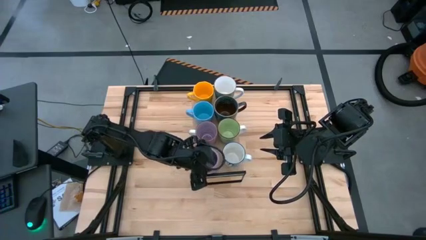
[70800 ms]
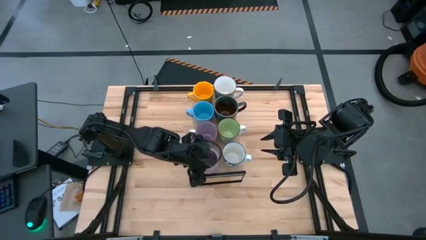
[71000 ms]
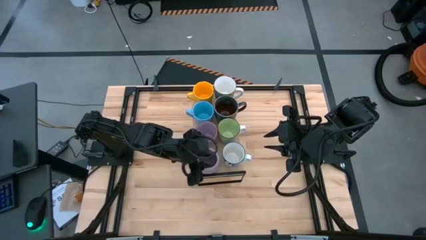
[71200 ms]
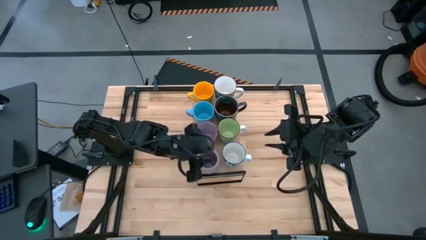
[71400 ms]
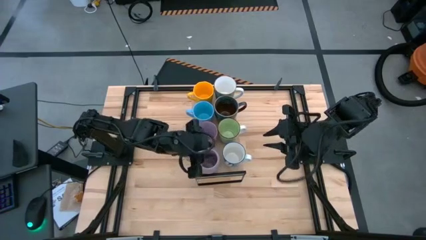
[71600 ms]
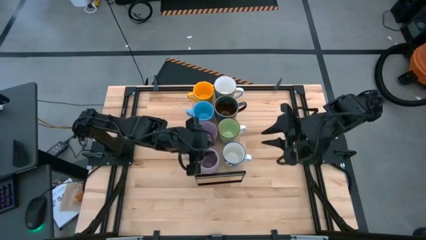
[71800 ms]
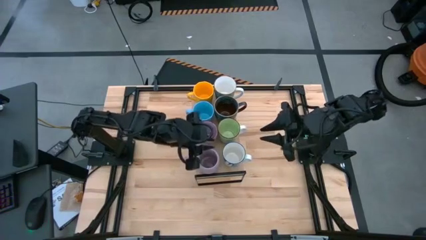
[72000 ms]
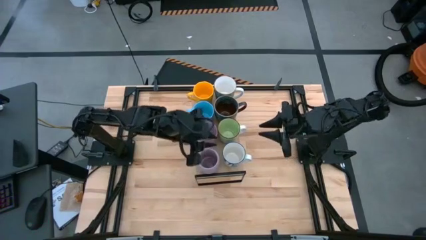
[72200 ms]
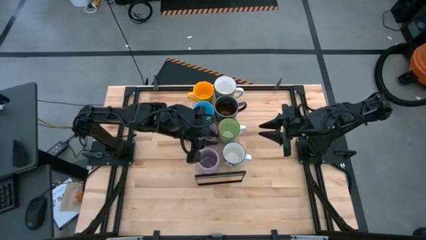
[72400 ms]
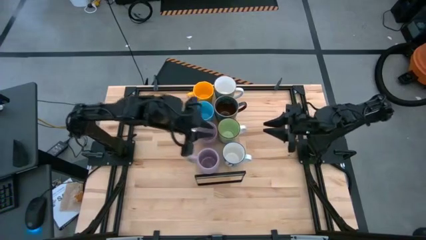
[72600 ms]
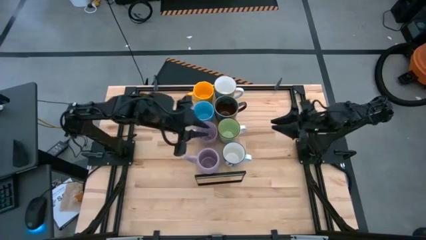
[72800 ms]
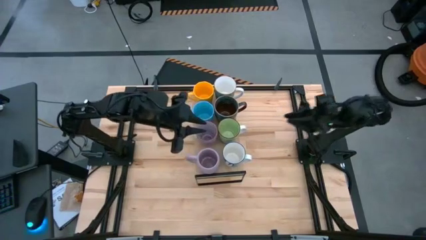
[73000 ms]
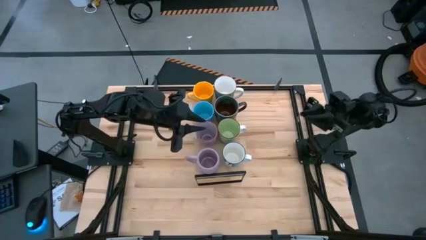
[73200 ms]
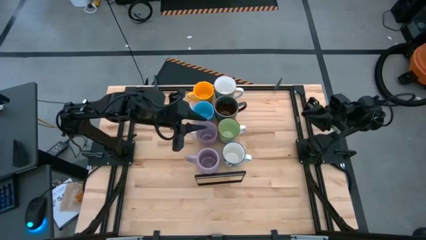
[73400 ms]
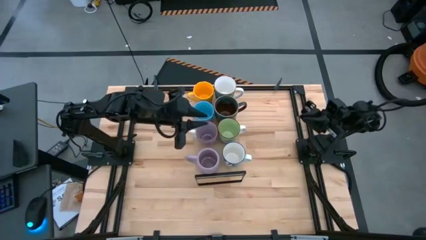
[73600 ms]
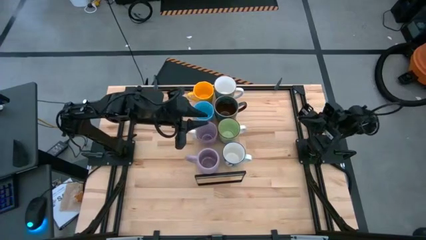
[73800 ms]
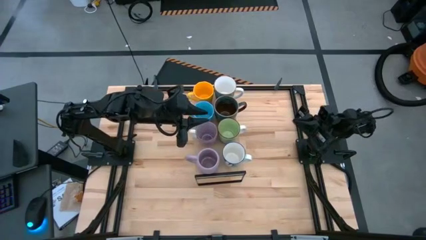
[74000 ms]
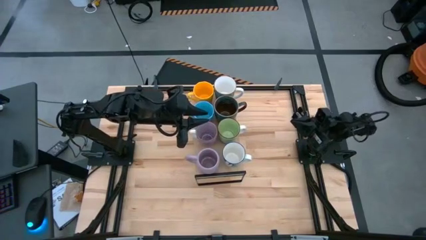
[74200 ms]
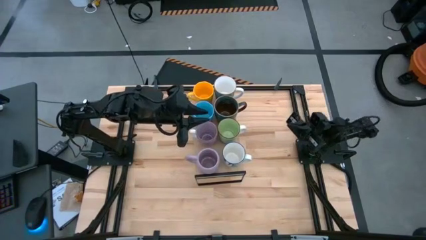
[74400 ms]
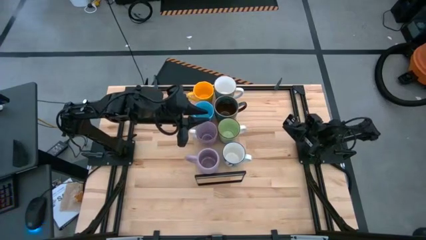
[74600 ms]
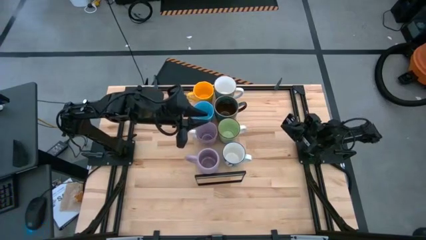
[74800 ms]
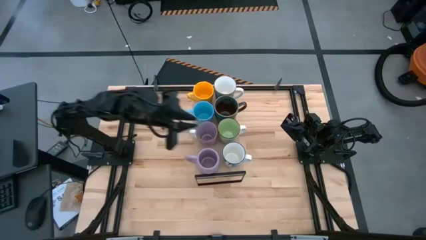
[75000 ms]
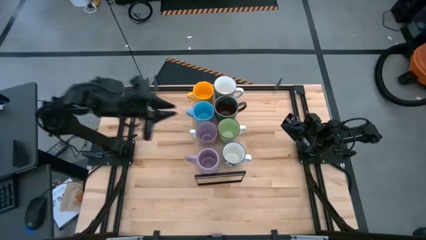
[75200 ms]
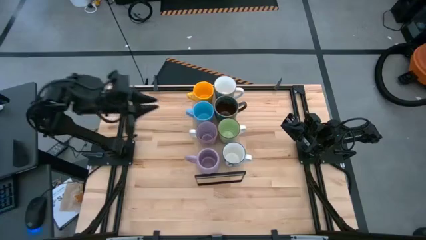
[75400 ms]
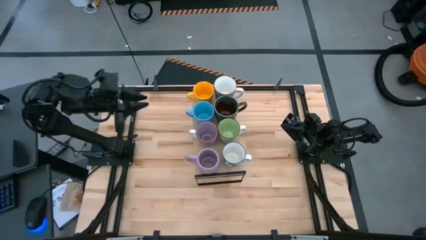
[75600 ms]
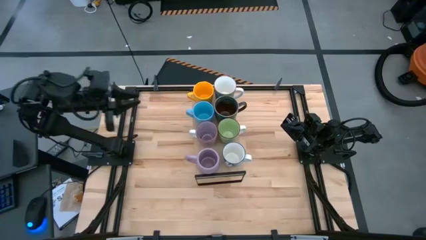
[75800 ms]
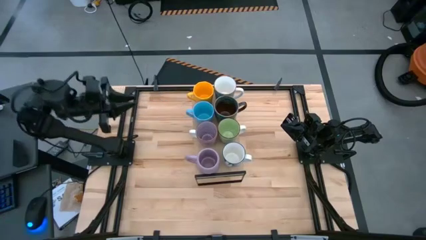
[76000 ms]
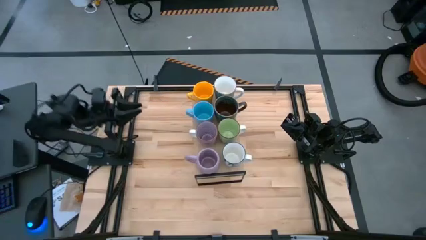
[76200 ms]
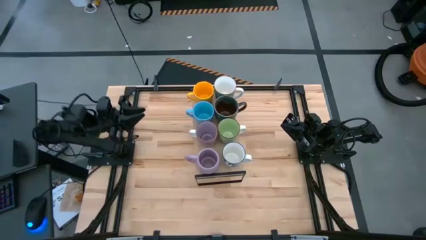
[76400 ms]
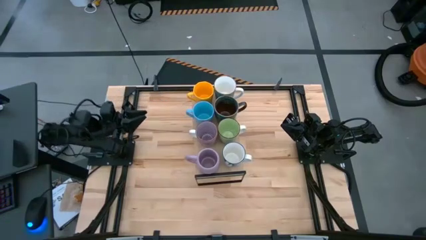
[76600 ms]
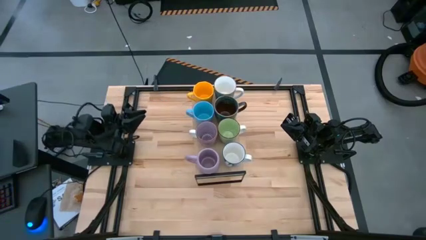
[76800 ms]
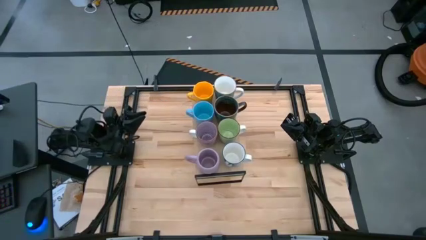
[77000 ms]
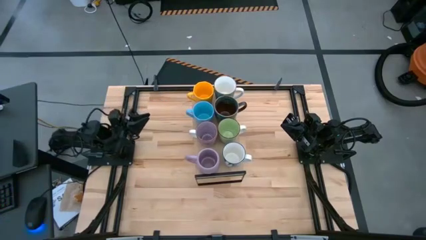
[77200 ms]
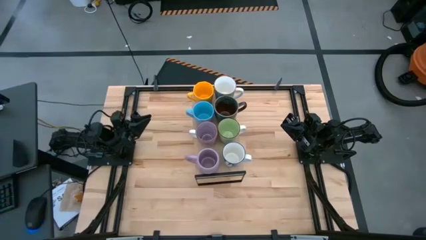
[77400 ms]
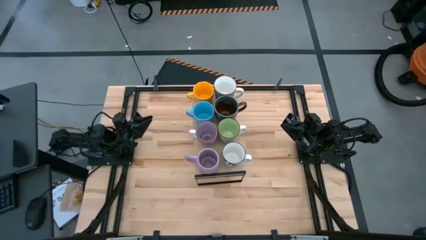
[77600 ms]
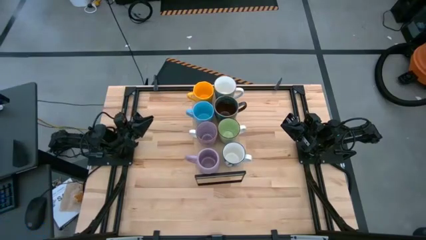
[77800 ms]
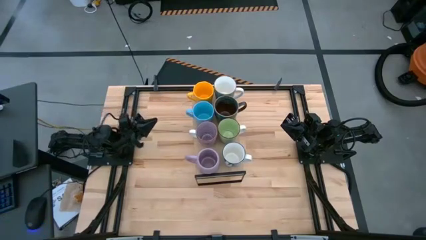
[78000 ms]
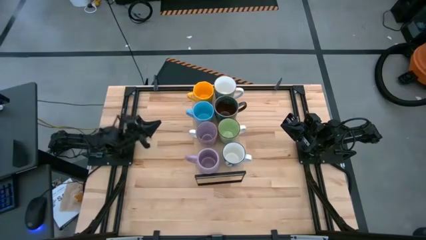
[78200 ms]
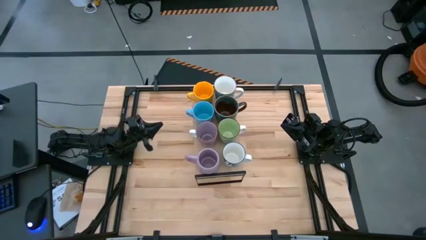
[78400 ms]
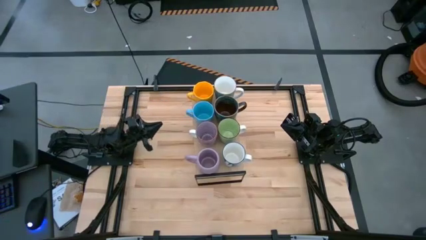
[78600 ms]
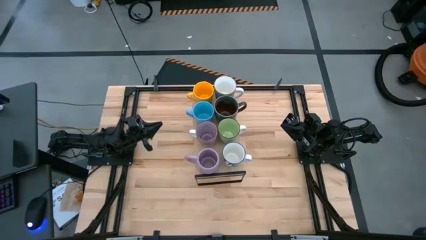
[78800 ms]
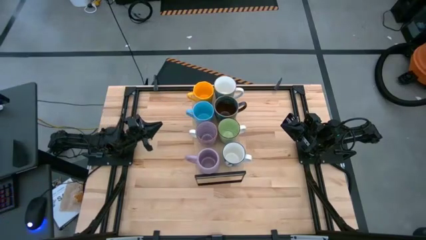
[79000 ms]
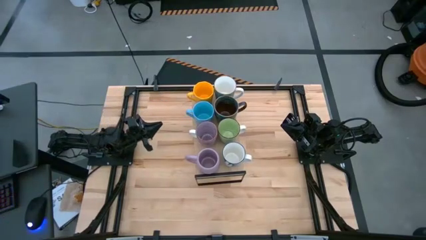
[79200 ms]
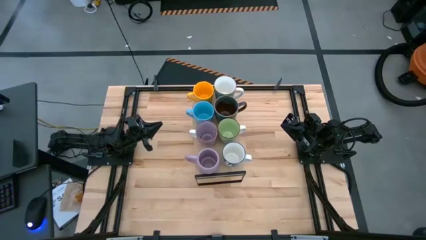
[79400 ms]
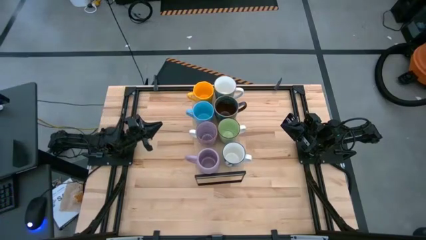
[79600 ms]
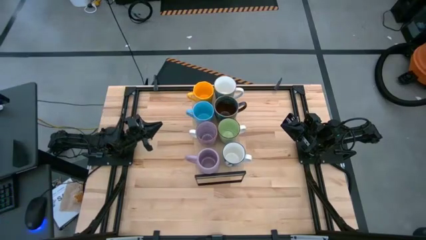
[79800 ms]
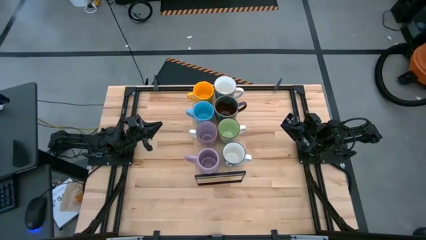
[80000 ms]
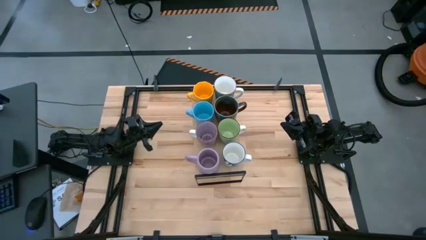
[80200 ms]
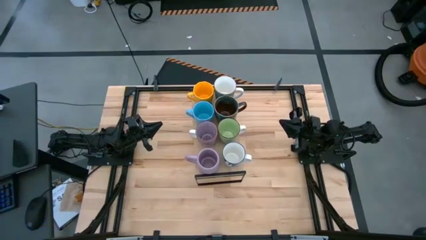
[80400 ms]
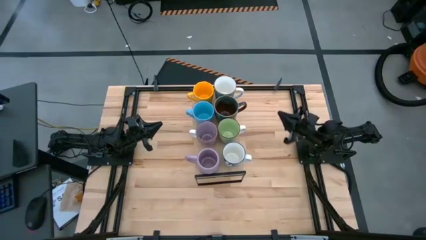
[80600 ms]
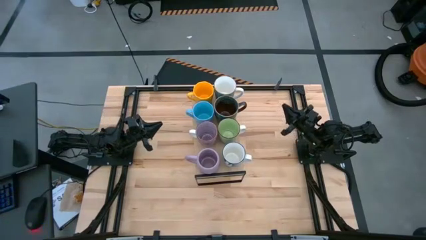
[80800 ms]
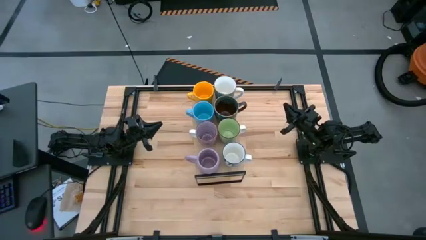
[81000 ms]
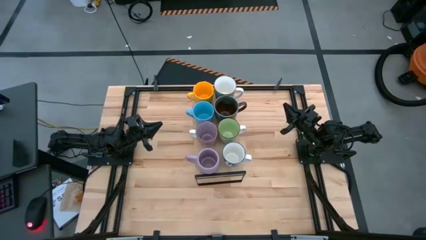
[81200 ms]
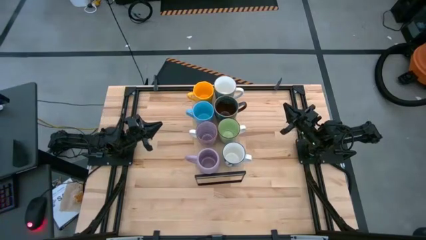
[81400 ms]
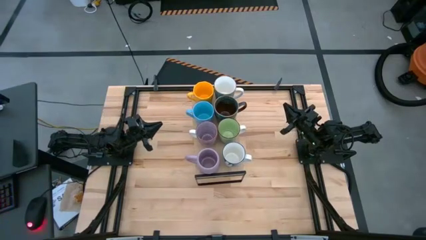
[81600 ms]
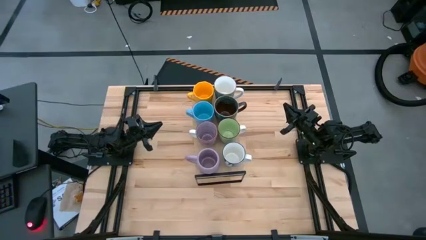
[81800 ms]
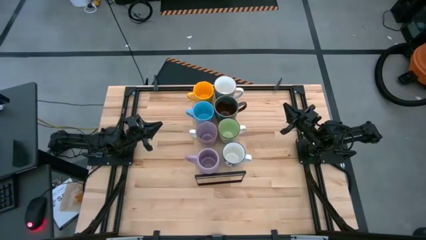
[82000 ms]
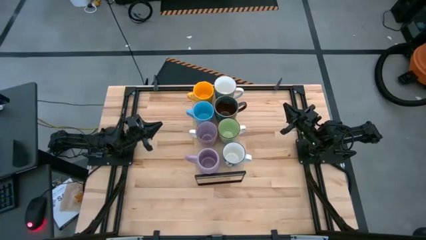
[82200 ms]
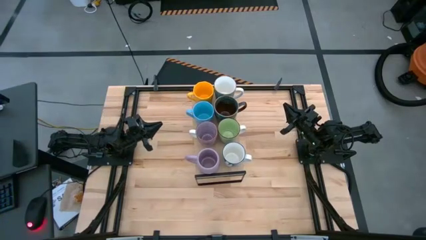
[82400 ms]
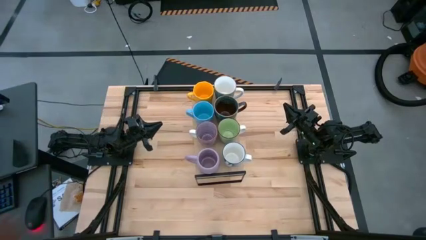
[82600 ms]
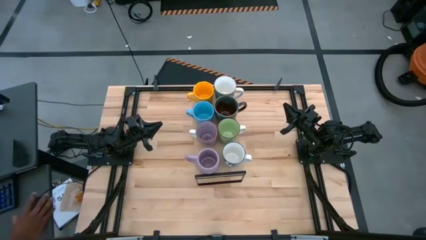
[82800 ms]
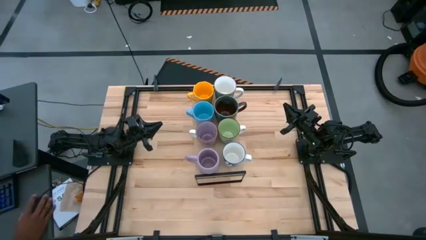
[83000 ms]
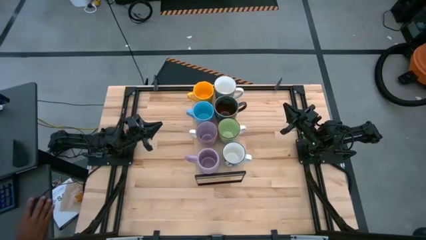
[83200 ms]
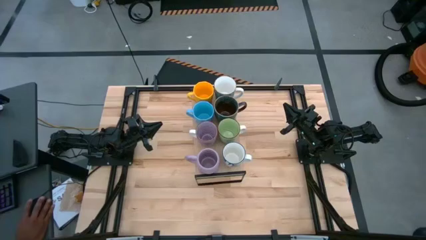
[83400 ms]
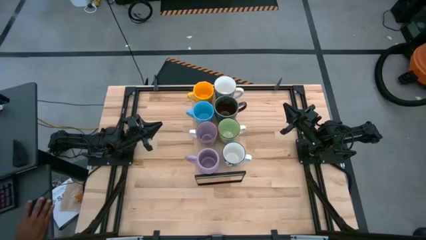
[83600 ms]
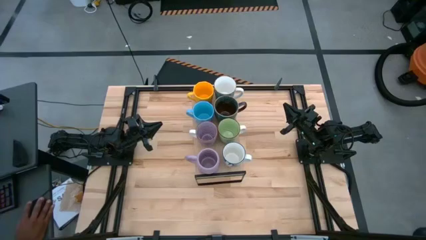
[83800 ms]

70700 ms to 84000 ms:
Task: Place coffee mugs
Return to Home Position

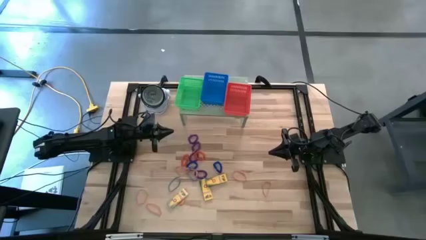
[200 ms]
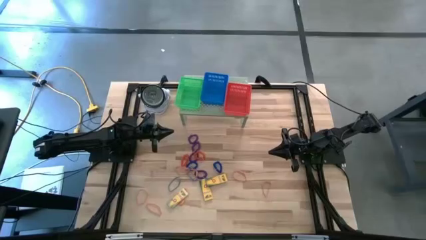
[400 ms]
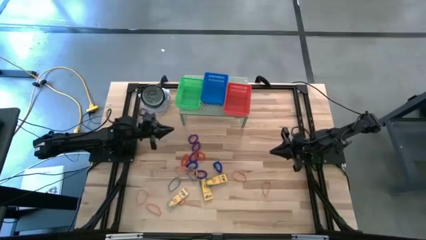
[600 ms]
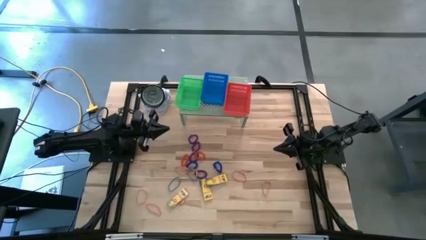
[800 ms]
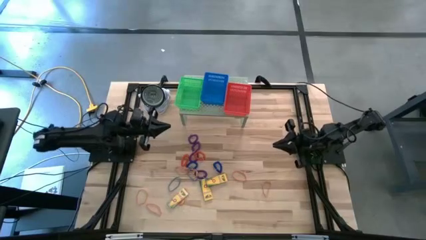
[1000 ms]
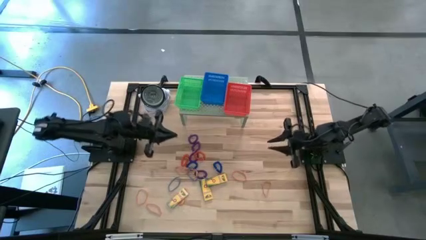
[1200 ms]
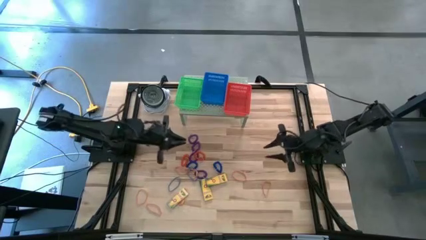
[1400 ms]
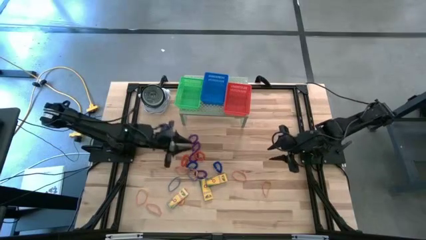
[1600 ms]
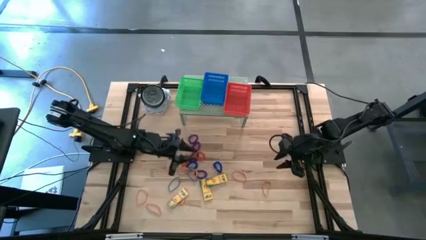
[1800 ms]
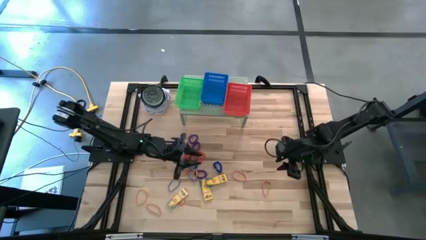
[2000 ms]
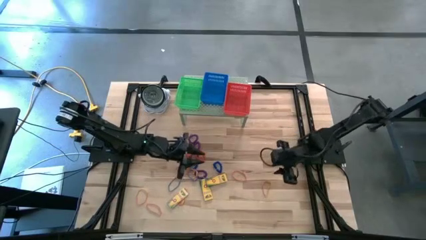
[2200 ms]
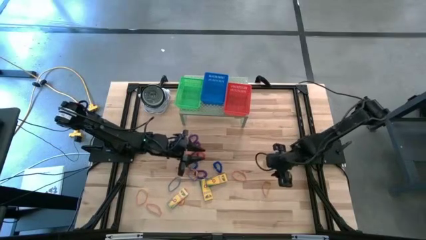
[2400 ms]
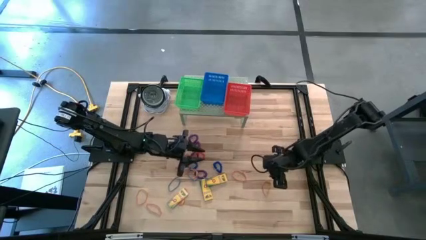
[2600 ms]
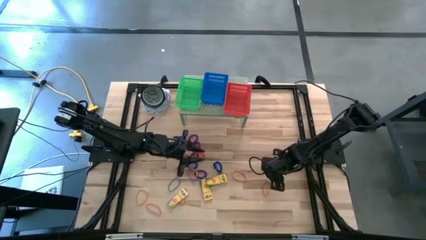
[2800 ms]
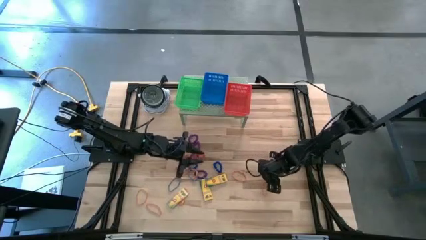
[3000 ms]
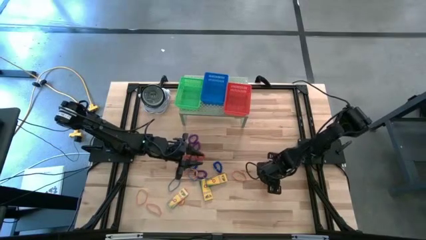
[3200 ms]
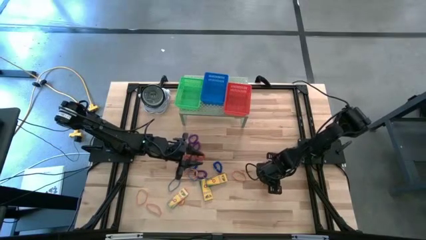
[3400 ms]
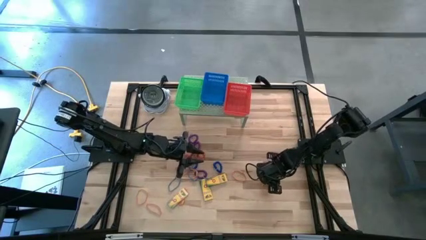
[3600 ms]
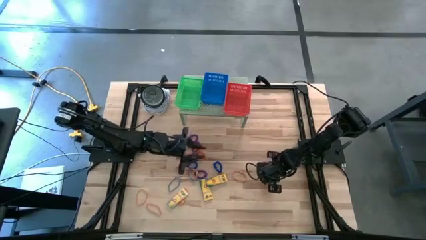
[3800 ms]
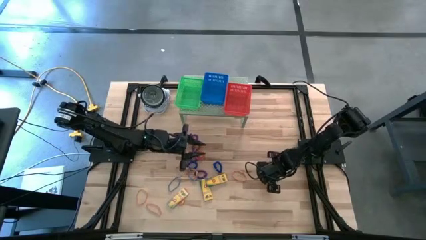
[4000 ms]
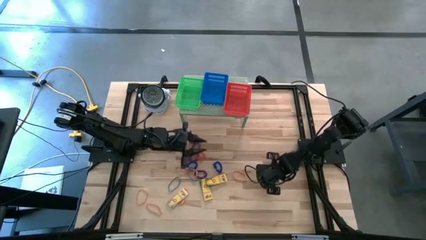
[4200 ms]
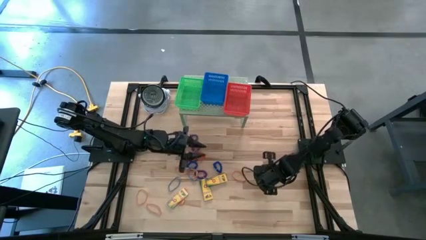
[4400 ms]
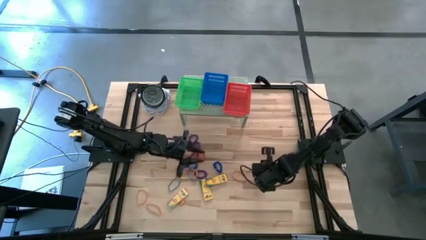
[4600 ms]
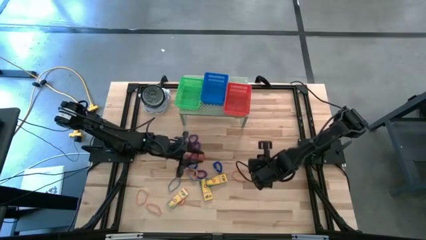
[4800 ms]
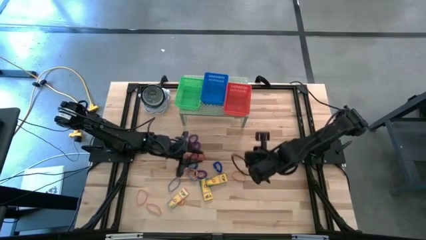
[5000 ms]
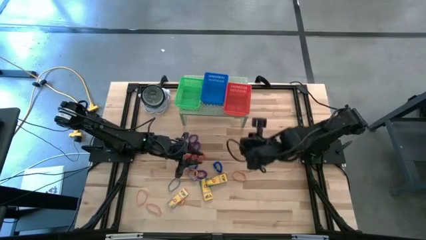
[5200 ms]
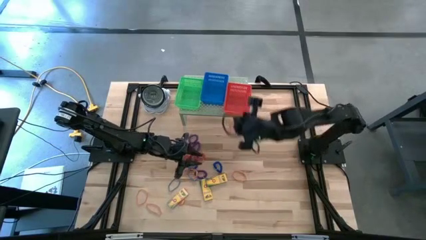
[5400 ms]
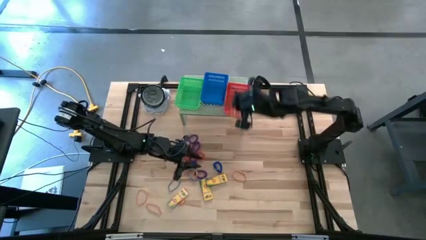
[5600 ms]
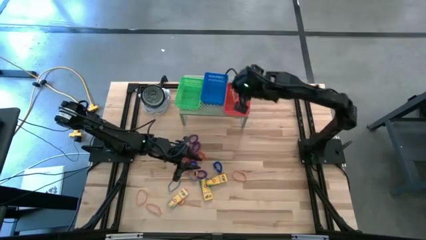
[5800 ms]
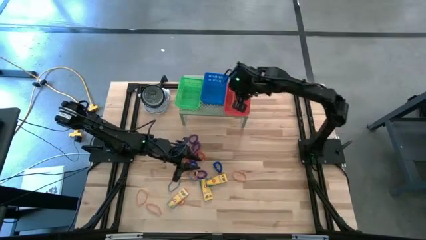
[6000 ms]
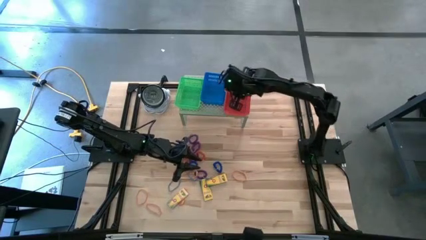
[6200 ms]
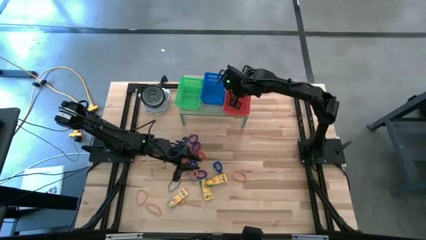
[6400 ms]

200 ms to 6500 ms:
Task: Pick & Place Office Desk Supplies
Put the orange rubber band into the red bin on the shelf
